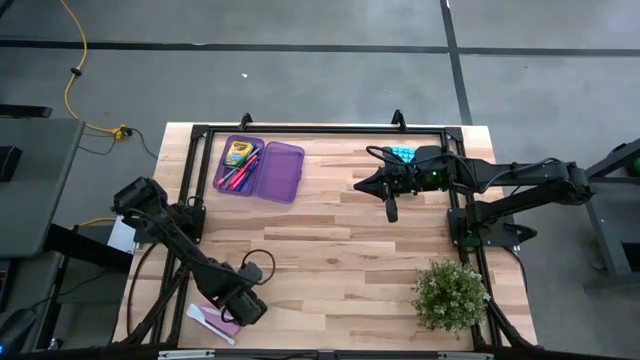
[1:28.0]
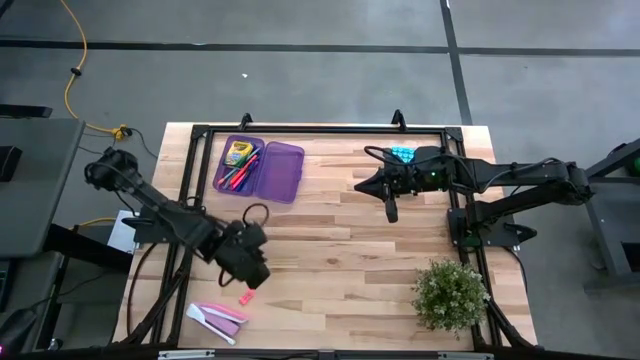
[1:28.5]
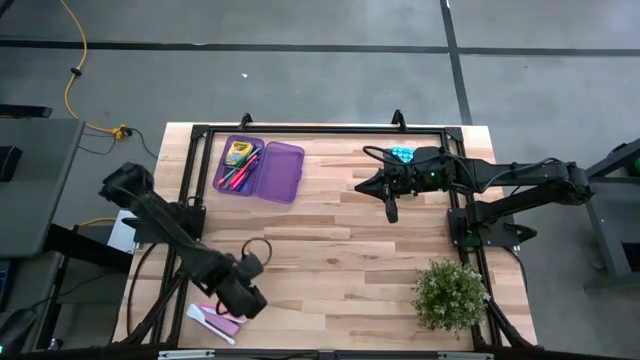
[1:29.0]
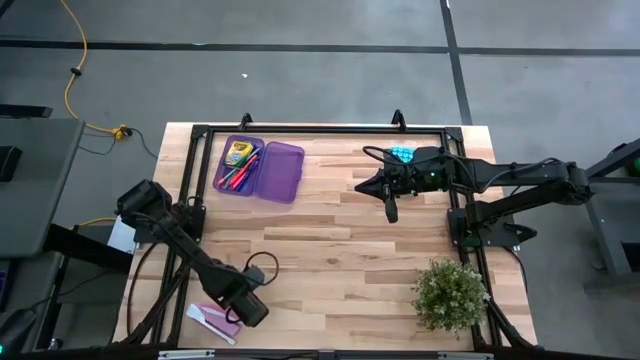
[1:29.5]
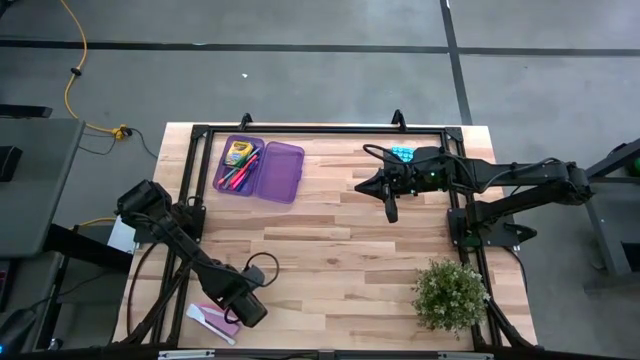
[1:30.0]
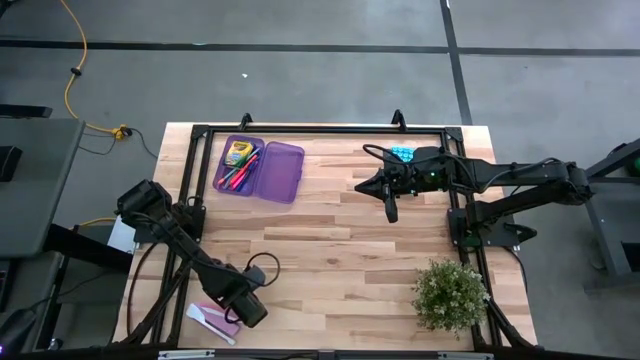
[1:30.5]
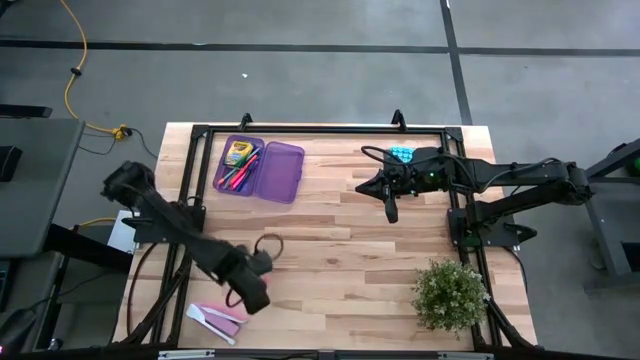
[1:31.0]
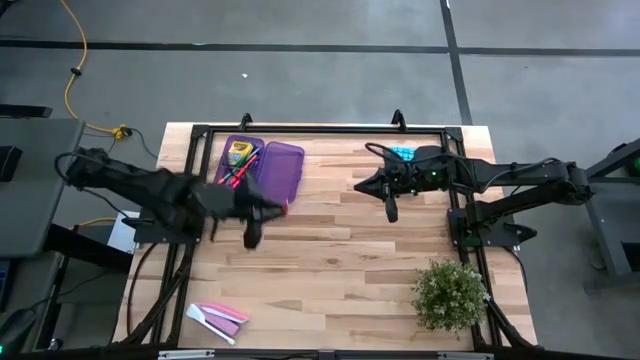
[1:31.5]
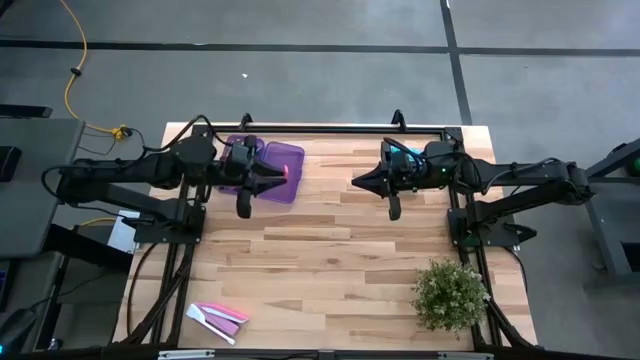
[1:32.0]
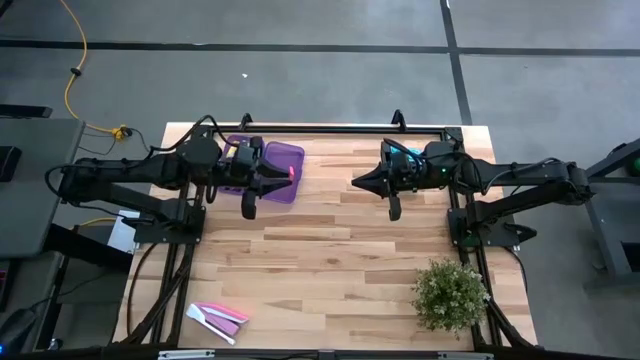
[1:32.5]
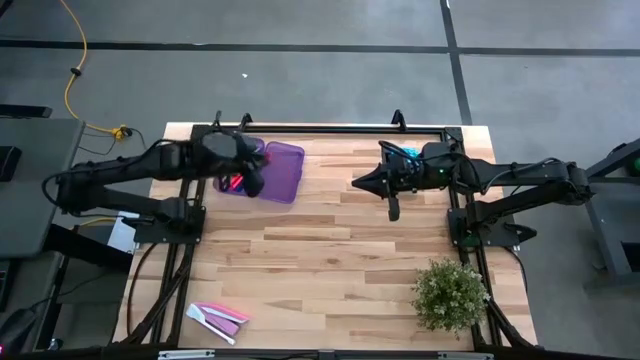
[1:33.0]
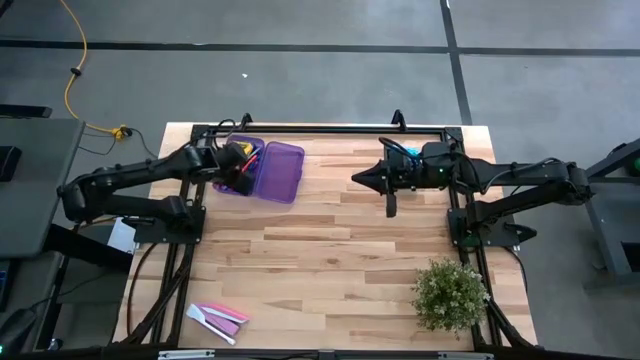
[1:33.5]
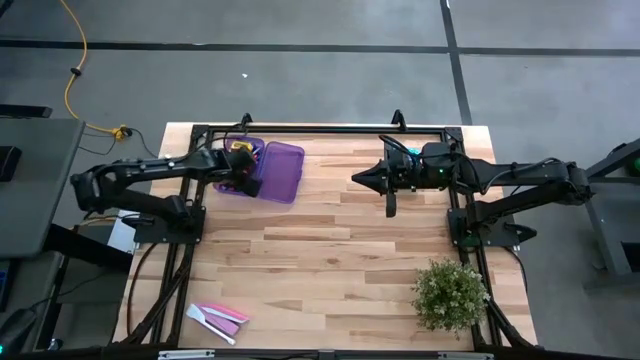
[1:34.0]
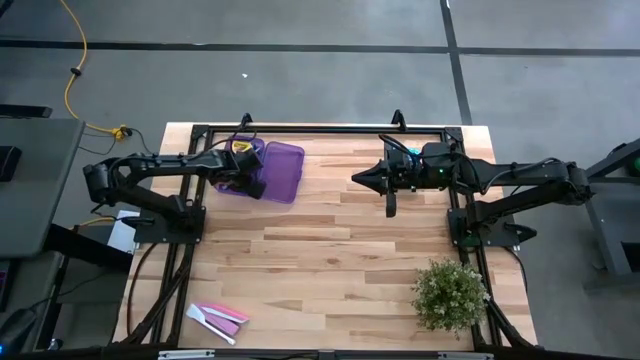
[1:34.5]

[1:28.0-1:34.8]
Task: Pack school essentials
Put the pink eraser into the purple supply box

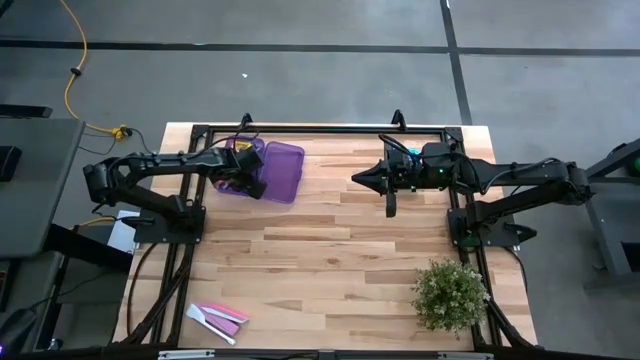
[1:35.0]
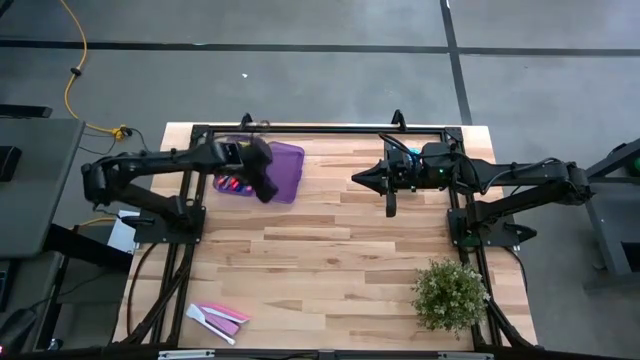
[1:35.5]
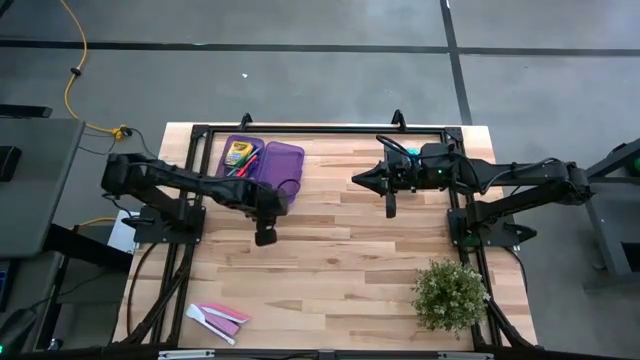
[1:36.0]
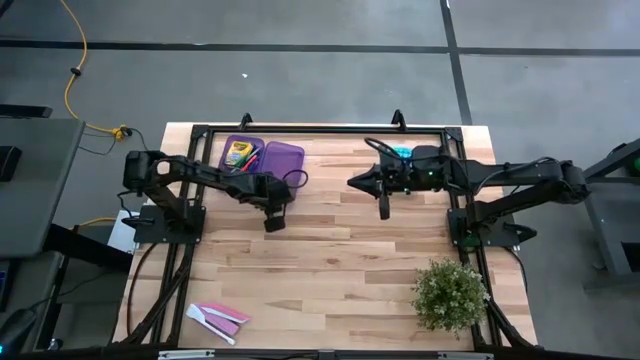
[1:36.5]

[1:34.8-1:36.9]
Adjust the purple supply box

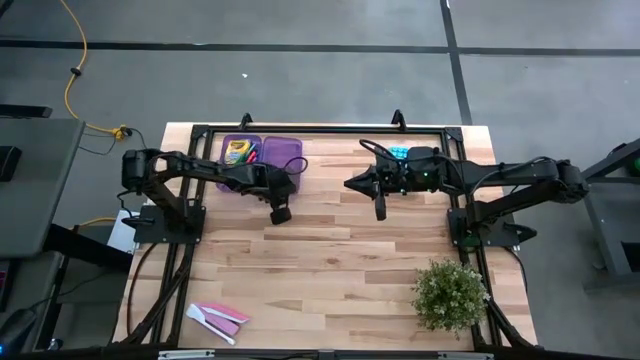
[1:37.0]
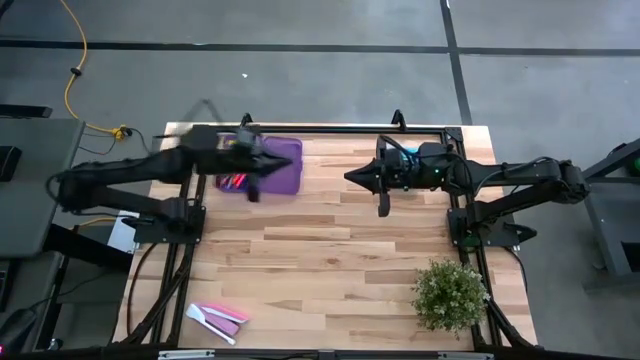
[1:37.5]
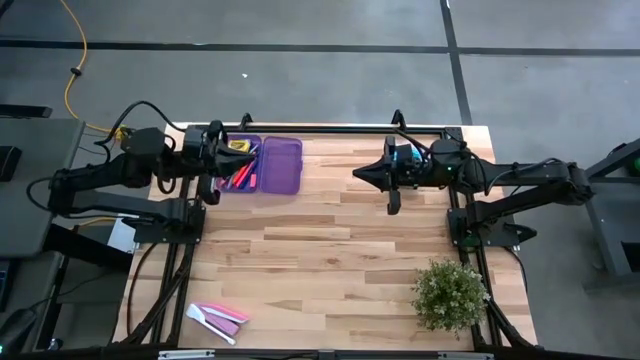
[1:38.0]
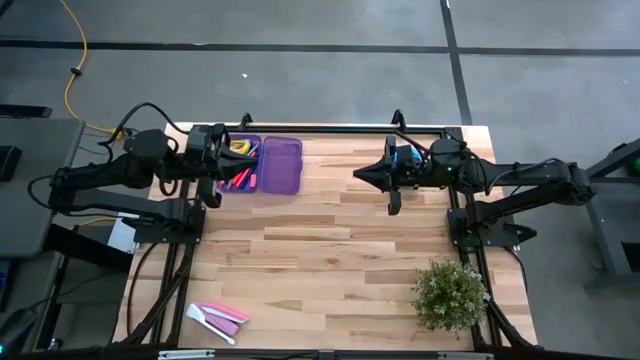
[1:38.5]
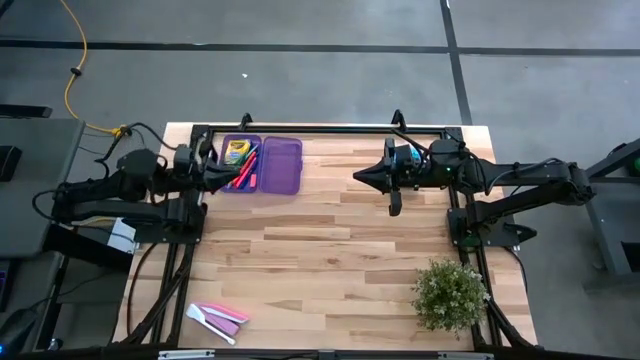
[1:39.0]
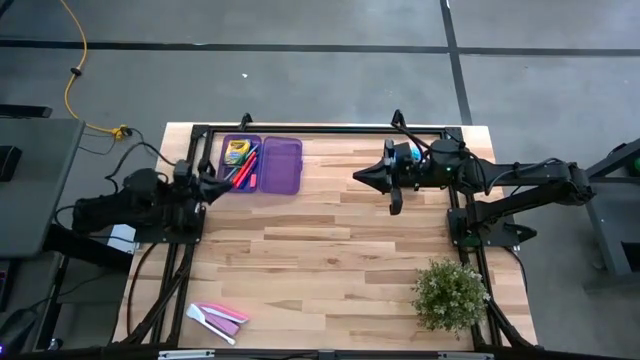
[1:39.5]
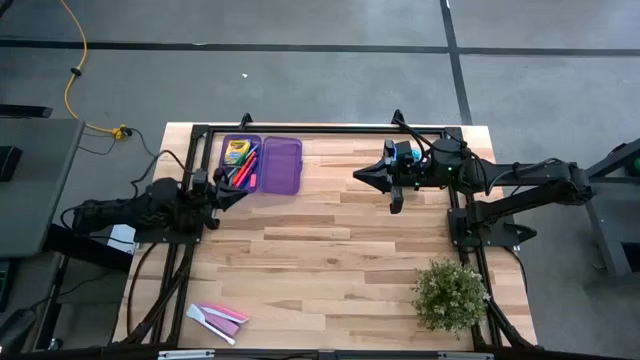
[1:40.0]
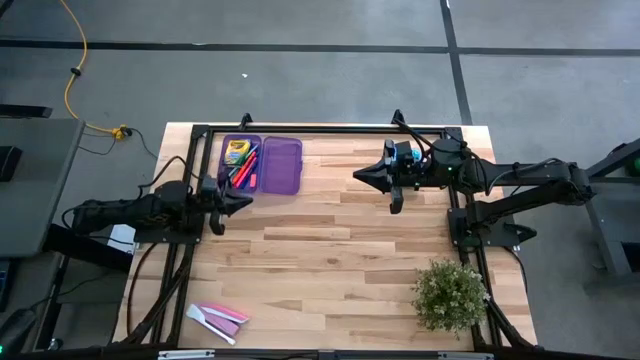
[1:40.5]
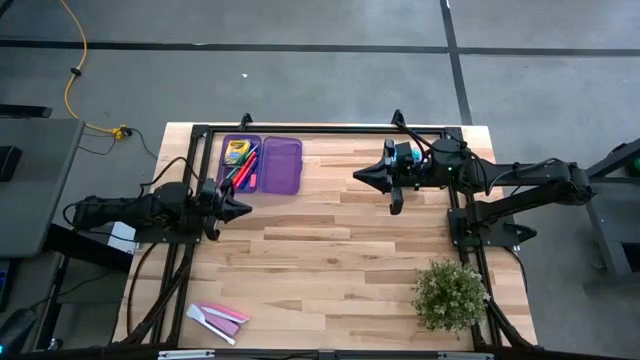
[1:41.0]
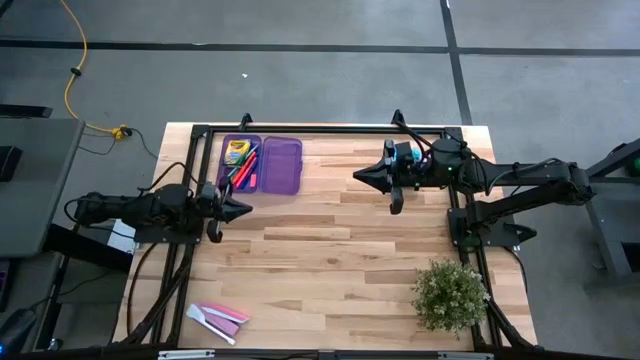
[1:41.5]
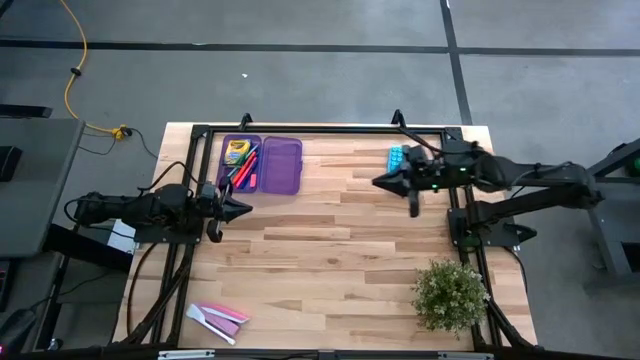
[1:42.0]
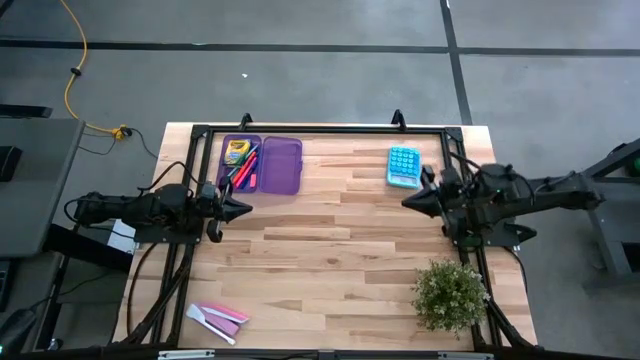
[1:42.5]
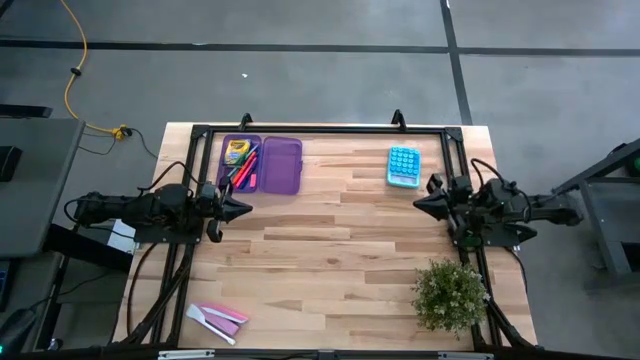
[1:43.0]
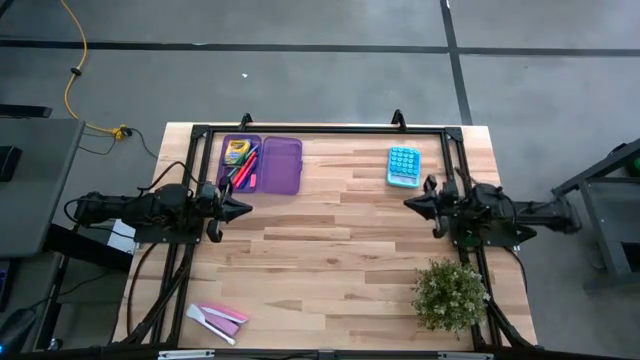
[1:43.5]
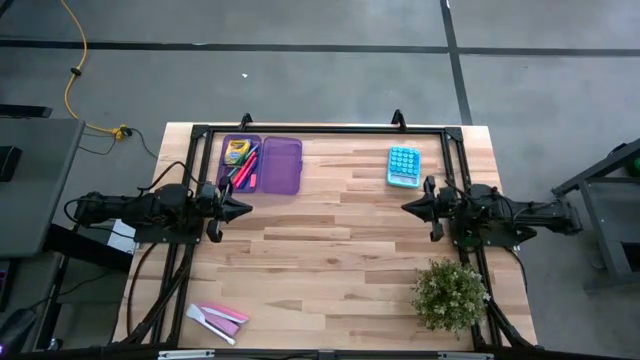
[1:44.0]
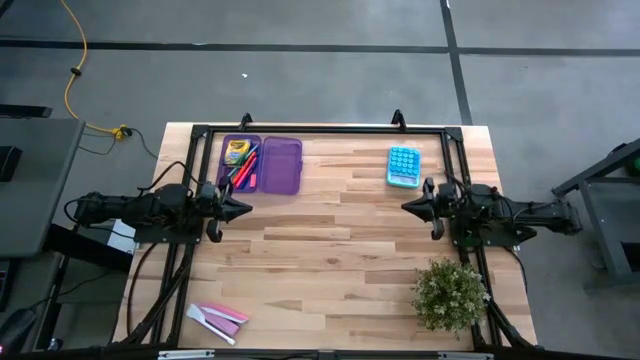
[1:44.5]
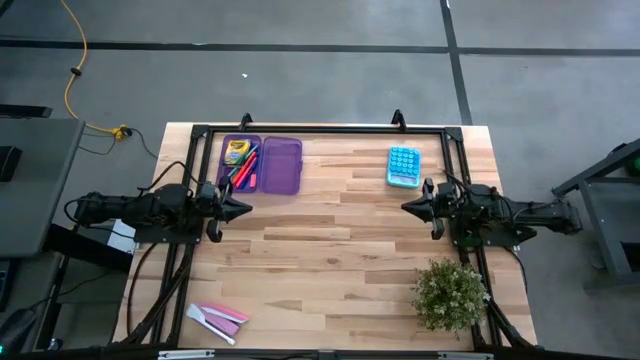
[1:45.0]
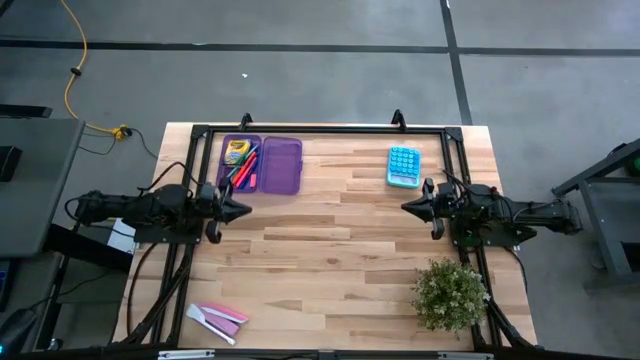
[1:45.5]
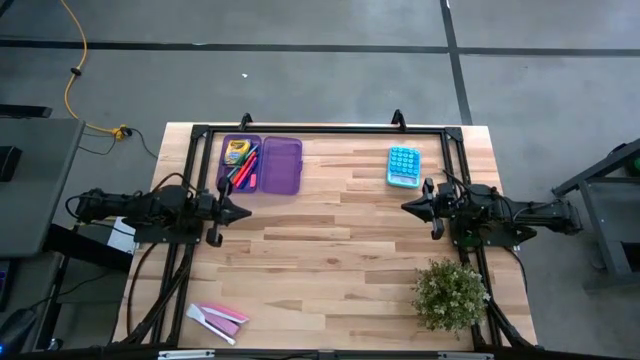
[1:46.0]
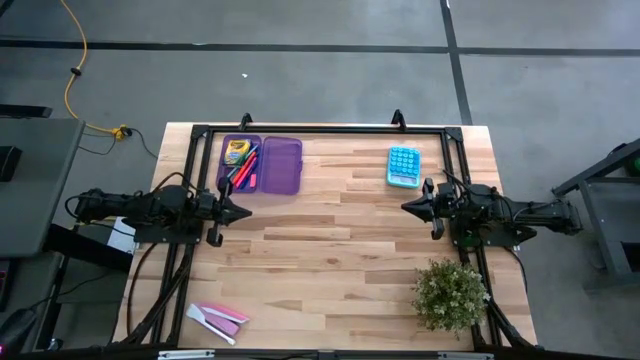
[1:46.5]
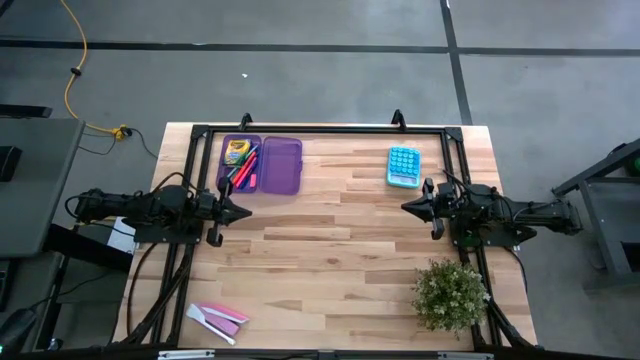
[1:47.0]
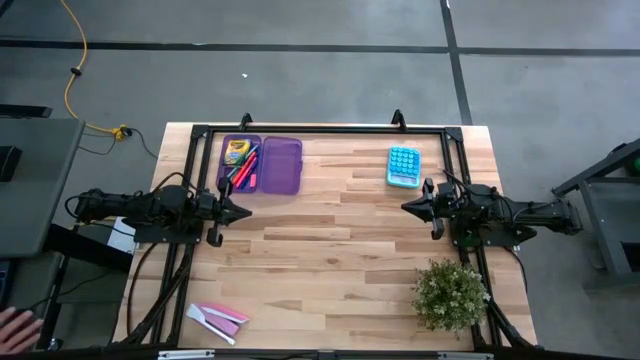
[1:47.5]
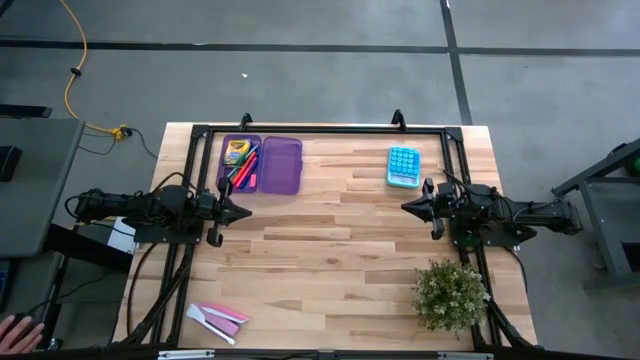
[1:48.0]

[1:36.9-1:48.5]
Return to Home Position
